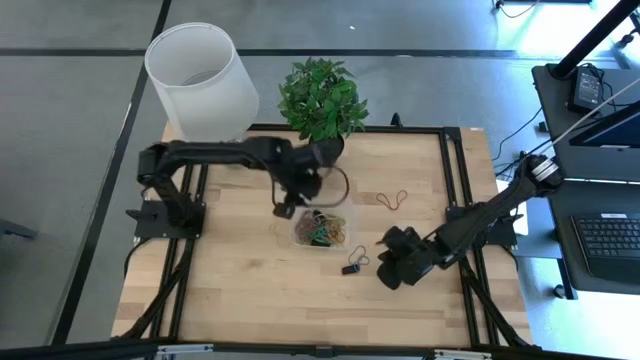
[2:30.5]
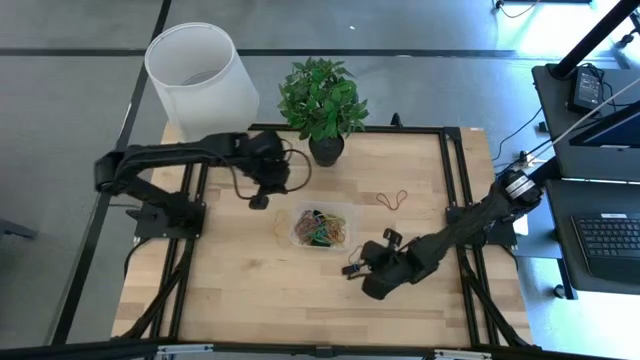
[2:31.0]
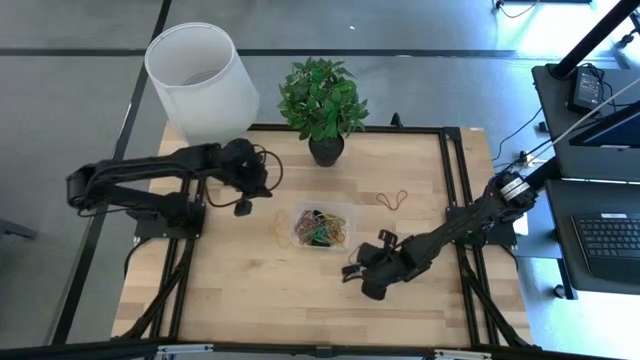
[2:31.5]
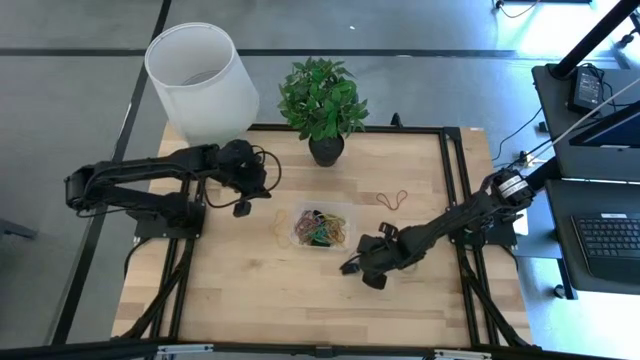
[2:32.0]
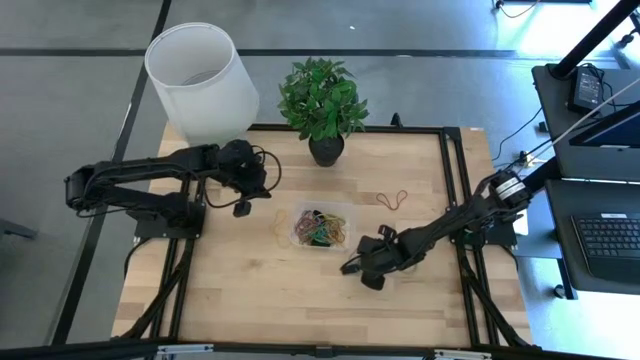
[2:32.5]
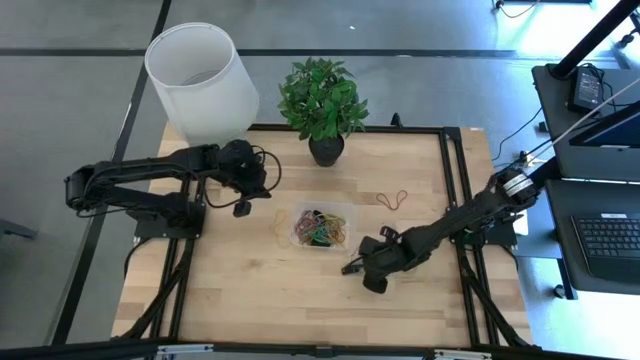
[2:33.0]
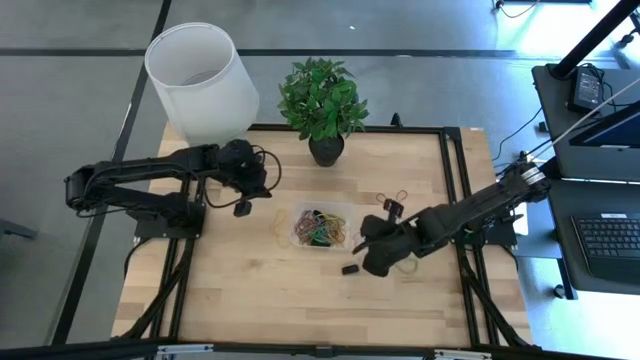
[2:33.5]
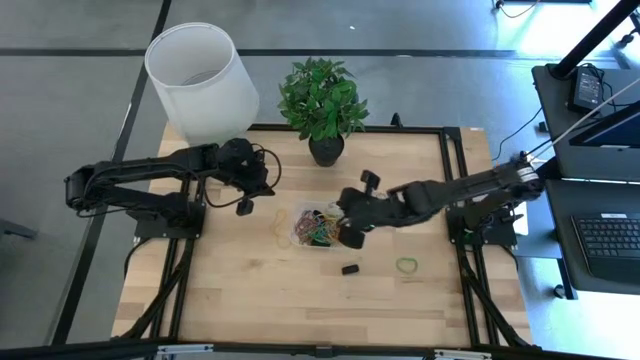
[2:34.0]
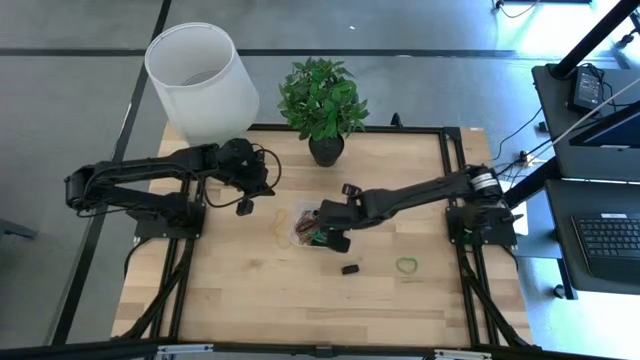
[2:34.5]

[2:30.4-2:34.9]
Task: Pick and place rubber bands into bin
Put the blue rubber band into the transparent container

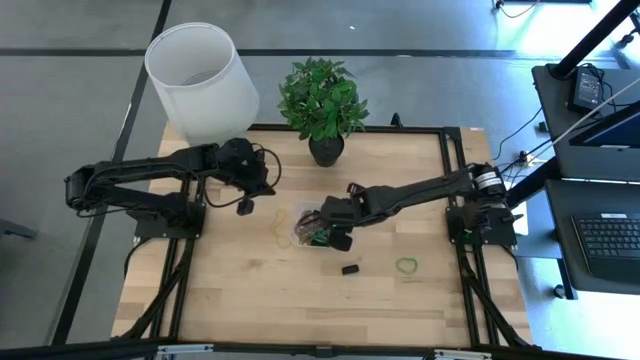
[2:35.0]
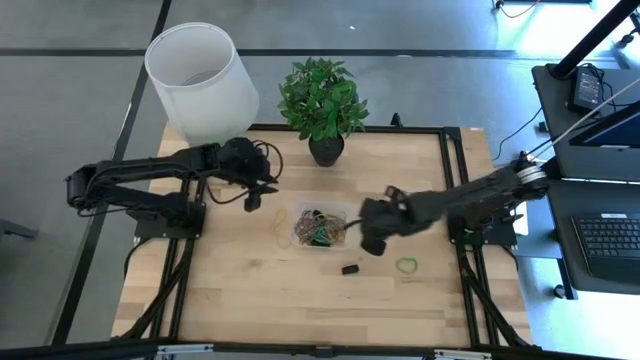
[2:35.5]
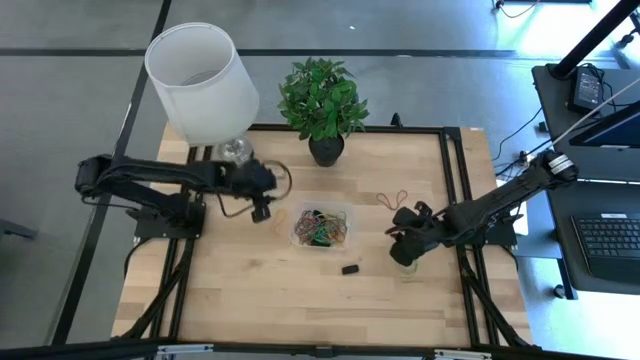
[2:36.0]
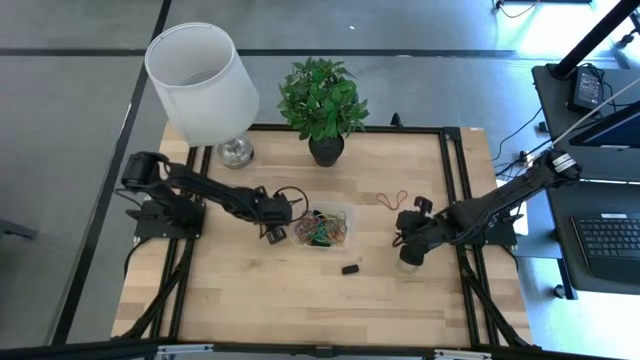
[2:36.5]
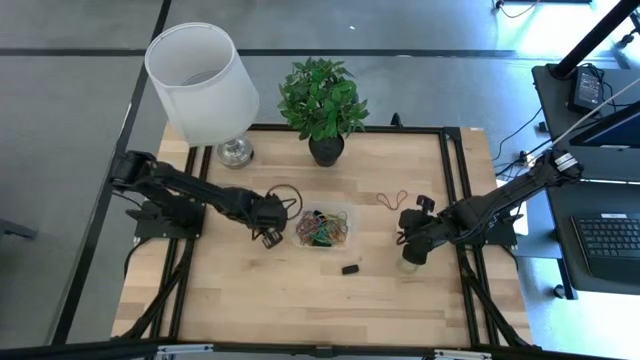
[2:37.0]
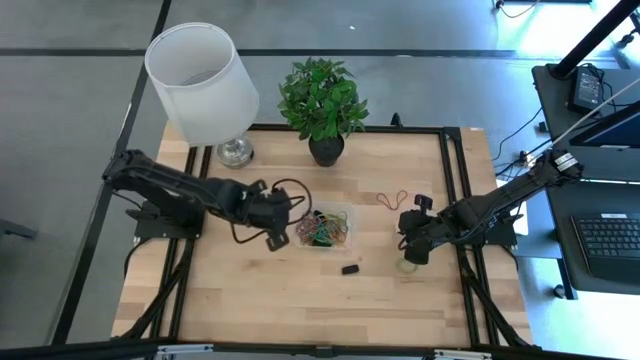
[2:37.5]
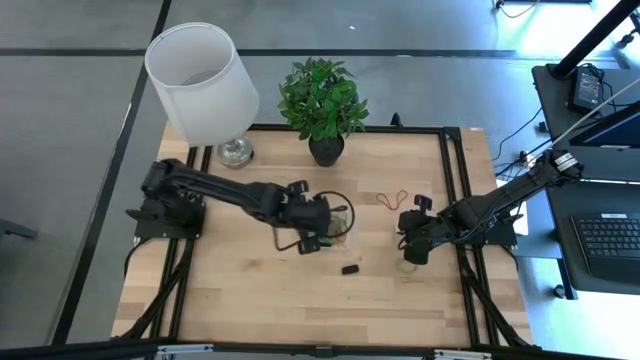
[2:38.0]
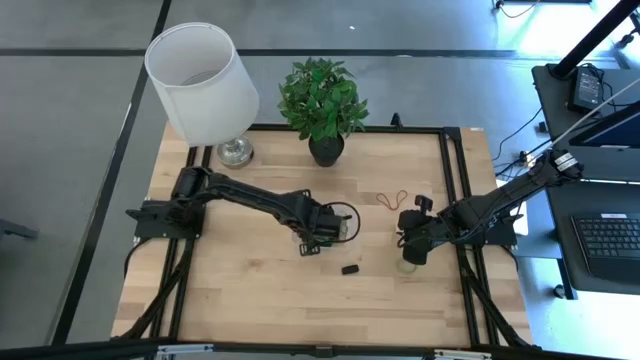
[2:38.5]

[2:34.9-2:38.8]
Put the yellow rubber band into the transparent container

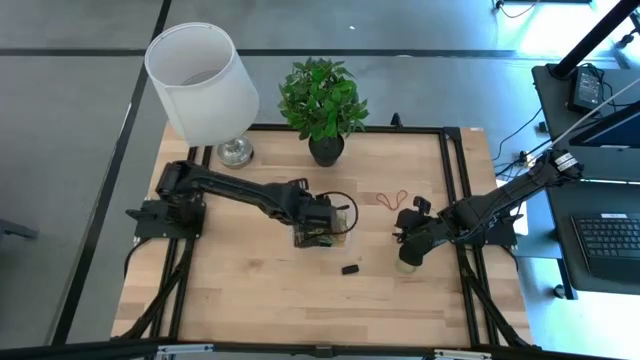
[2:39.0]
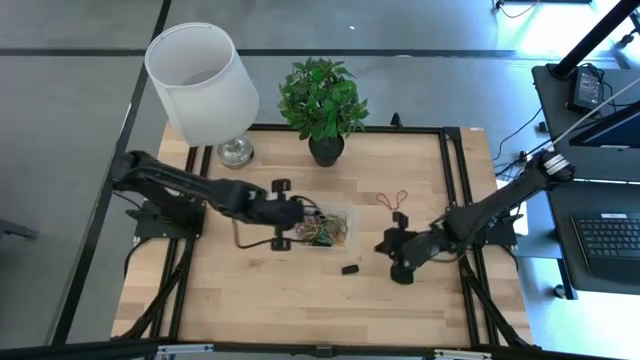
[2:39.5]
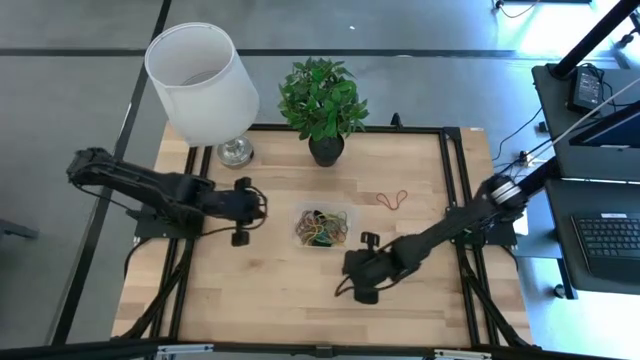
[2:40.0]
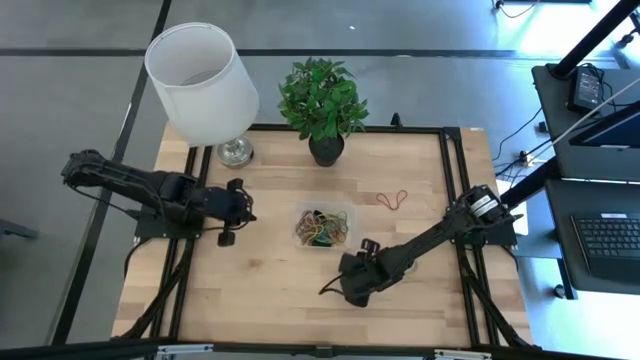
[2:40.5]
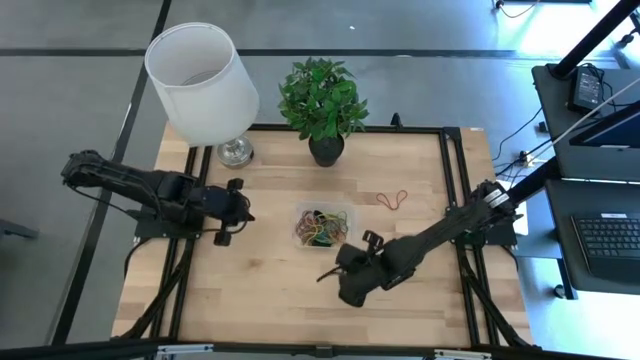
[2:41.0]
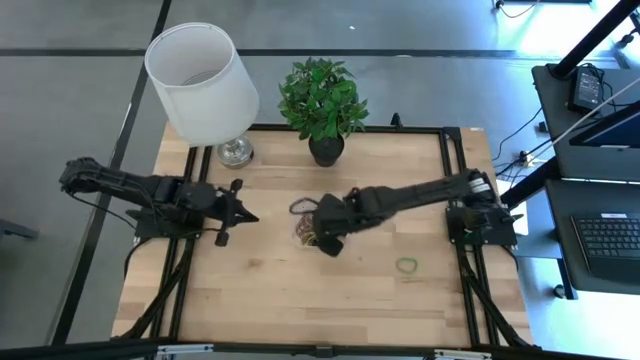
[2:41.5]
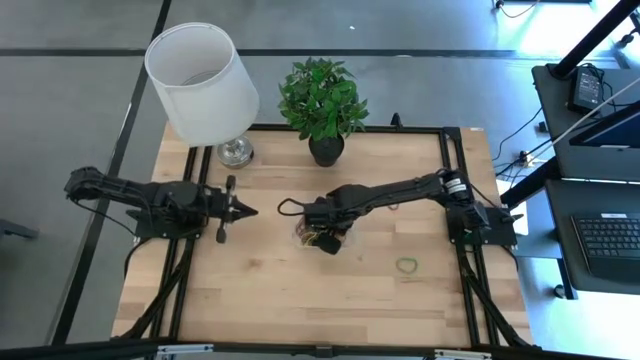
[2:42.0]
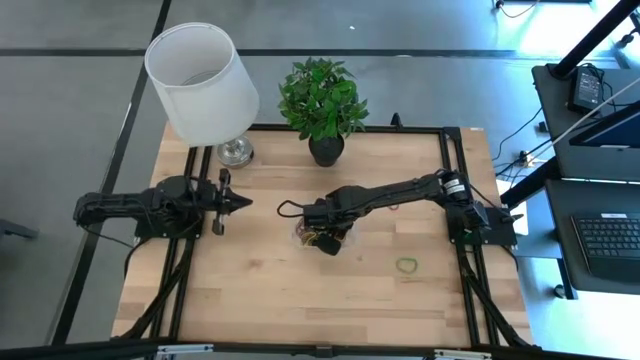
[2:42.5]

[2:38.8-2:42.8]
Put the black rubber band into the transparent container

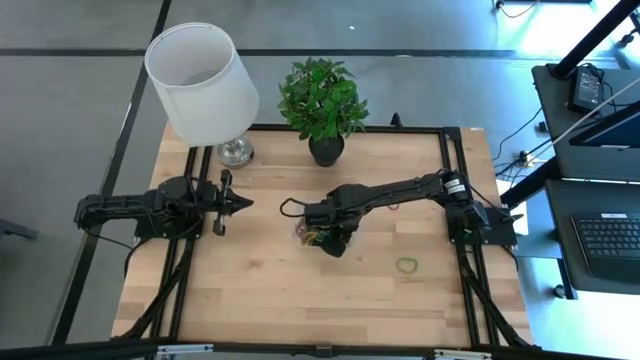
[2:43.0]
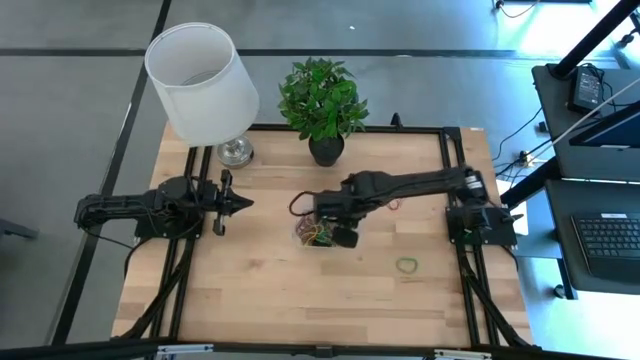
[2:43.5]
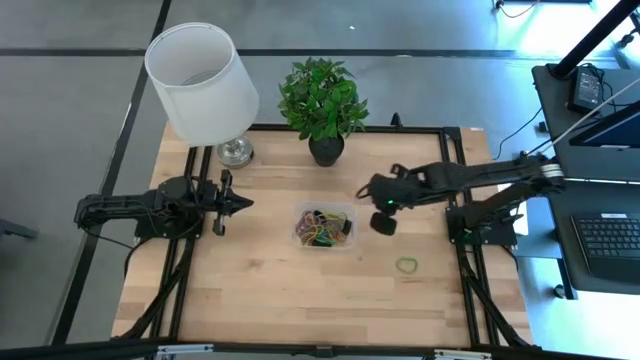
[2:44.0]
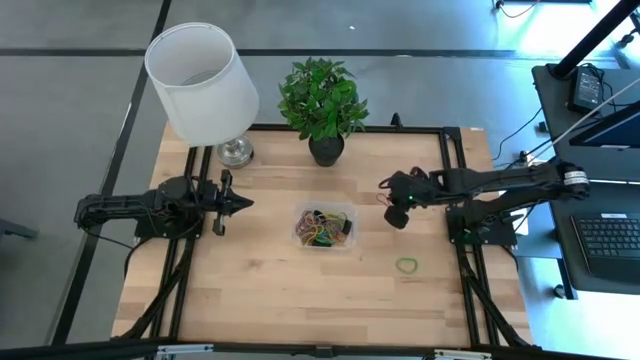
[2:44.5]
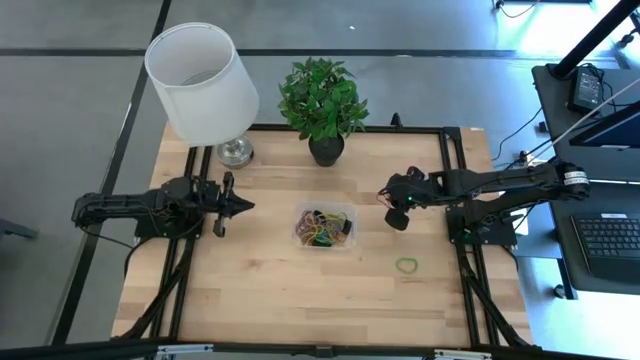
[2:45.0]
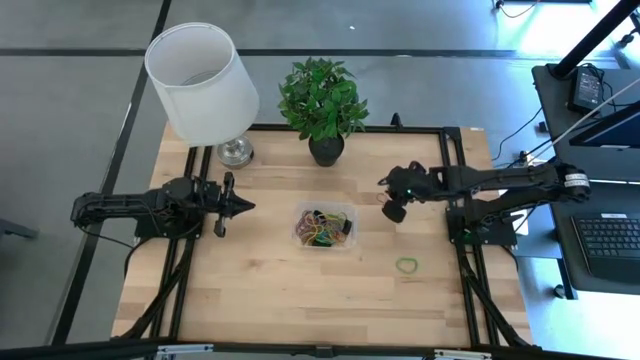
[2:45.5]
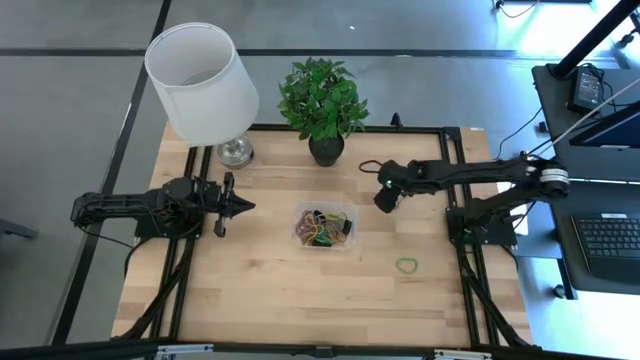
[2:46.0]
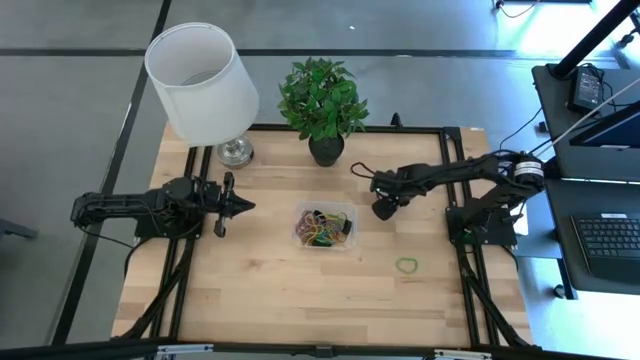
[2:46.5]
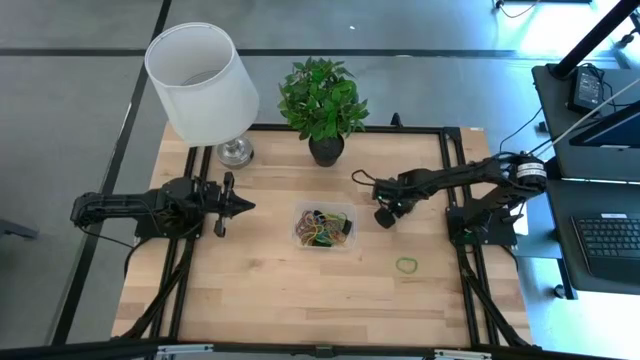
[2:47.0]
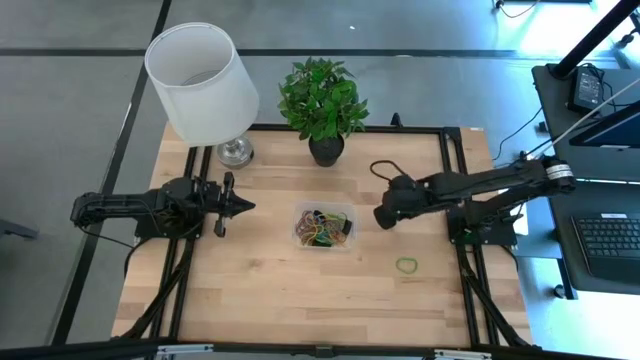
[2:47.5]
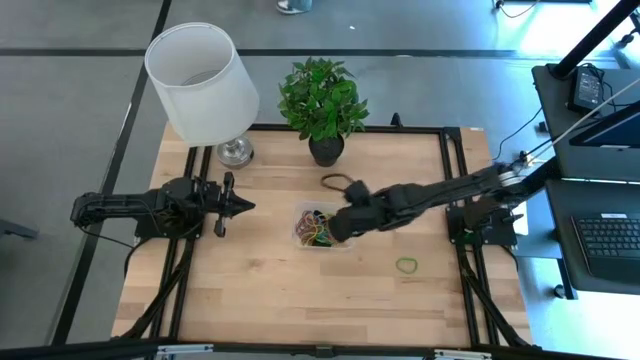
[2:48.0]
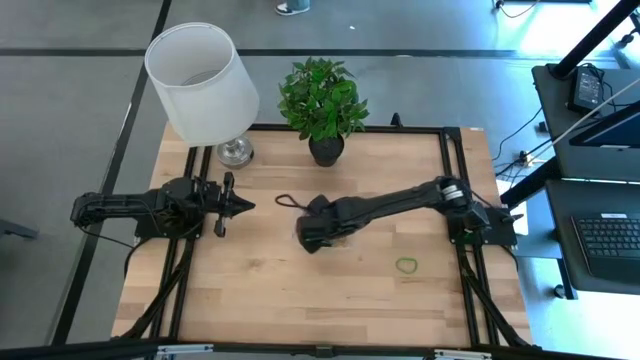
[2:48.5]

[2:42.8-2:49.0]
Put the red rubber band into the transparent container

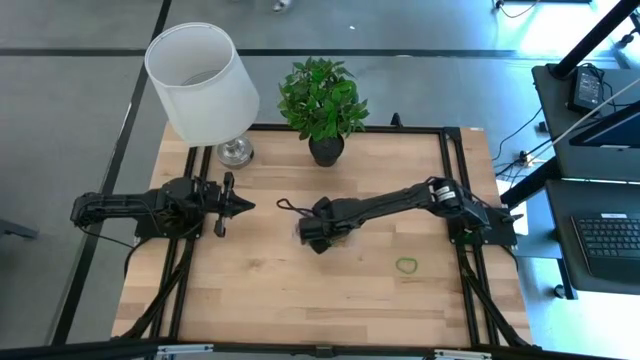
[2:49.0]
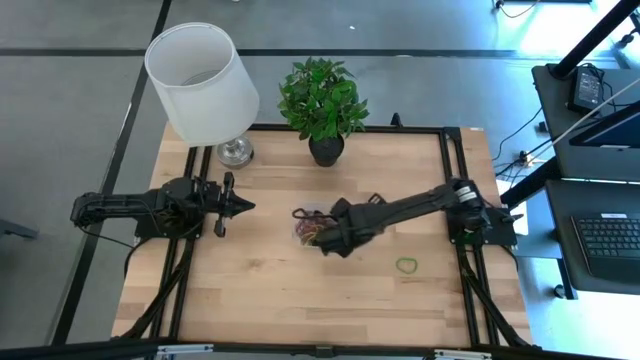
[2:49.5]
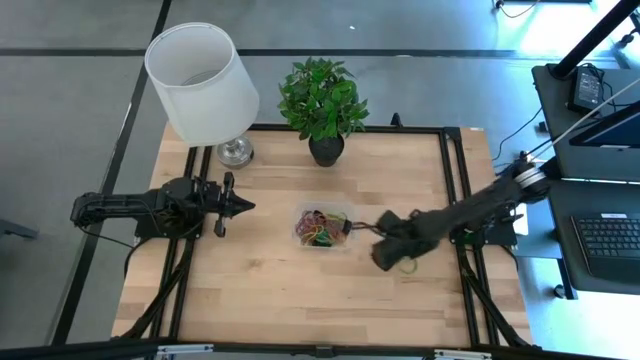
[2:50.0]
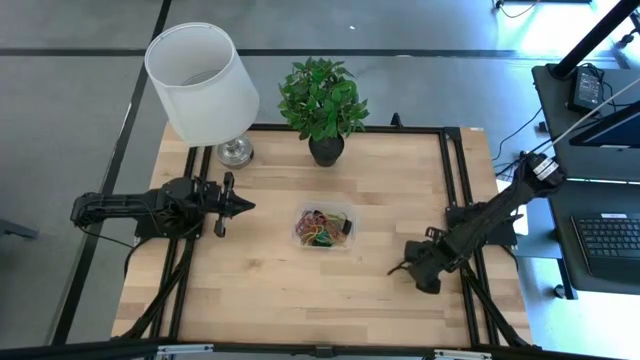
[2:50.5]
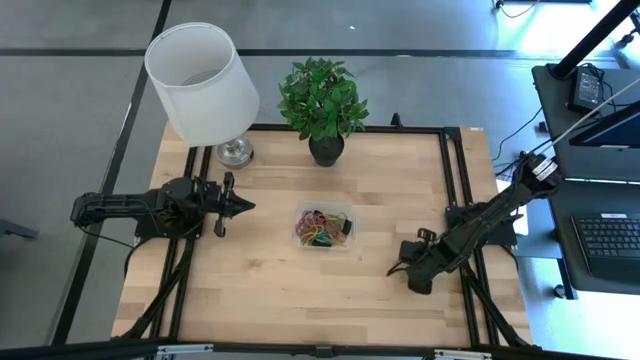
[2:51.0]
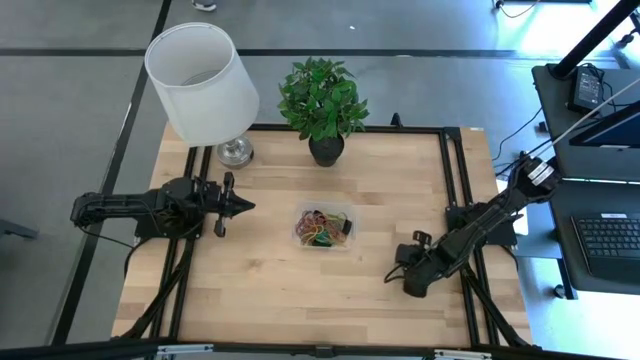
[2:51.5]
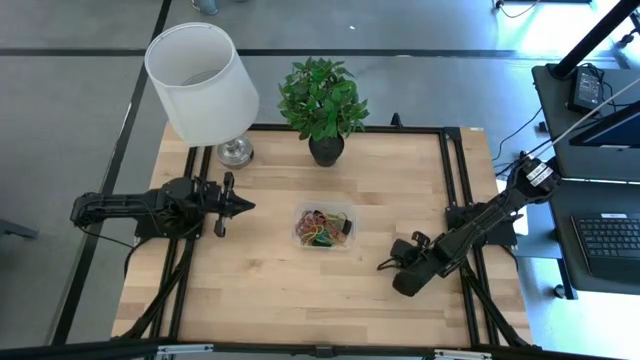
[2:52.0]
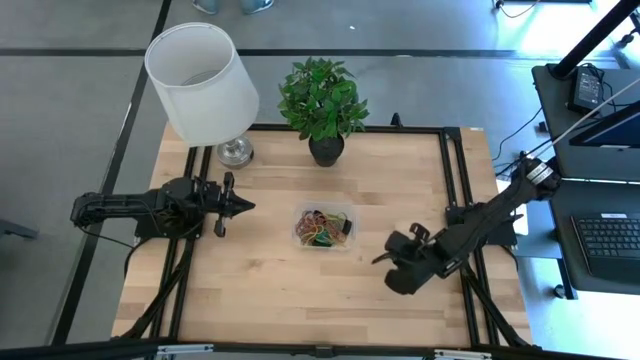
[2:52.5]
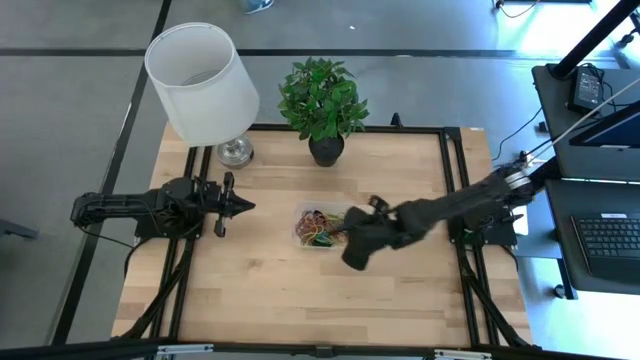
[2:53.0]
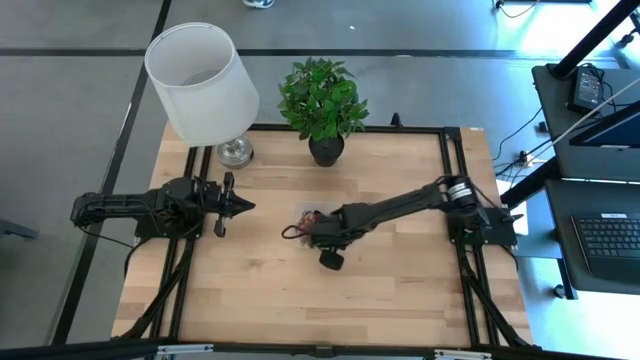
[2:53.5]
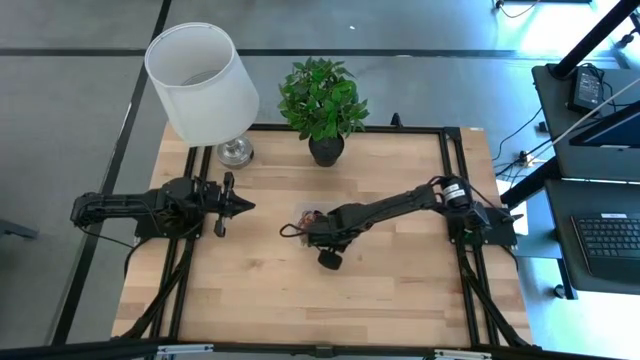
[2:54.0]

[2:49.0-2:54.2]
Put the green rubber band into the transparent container
